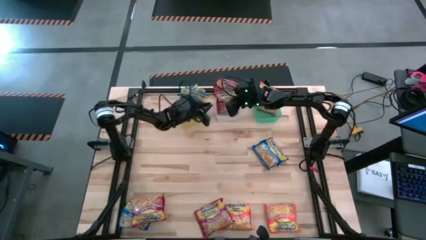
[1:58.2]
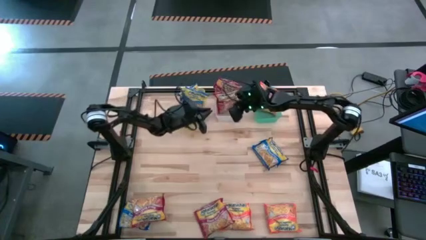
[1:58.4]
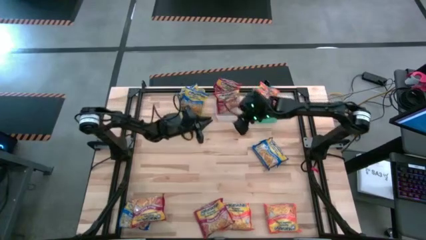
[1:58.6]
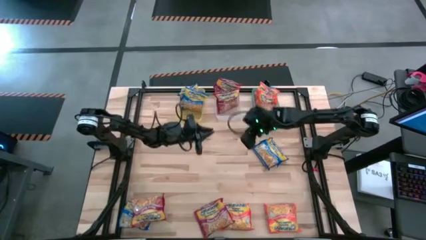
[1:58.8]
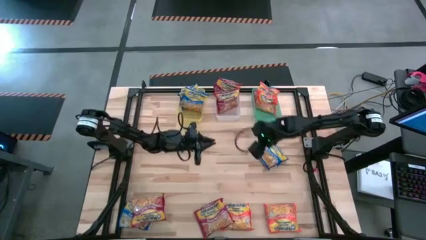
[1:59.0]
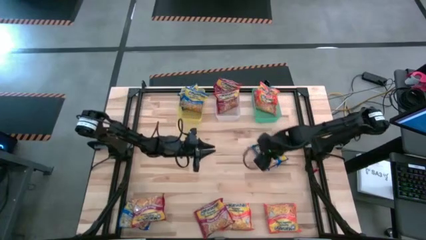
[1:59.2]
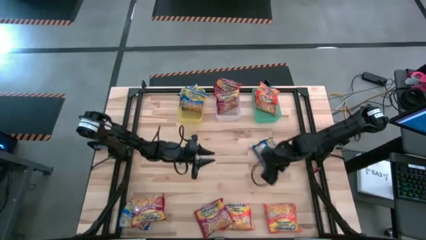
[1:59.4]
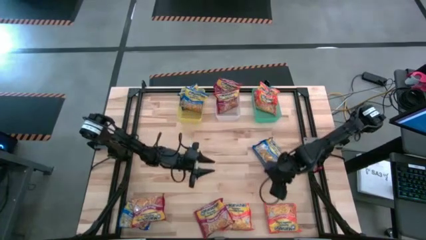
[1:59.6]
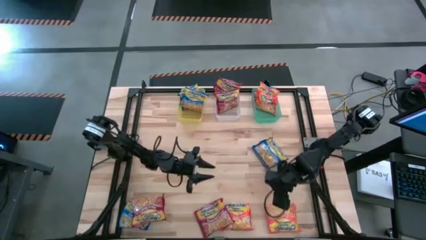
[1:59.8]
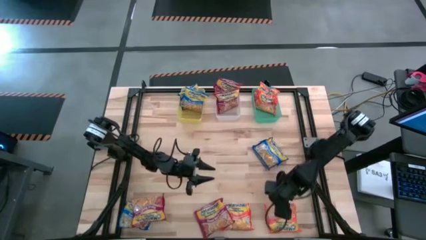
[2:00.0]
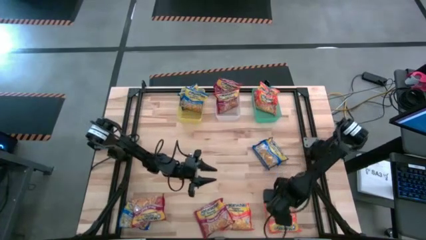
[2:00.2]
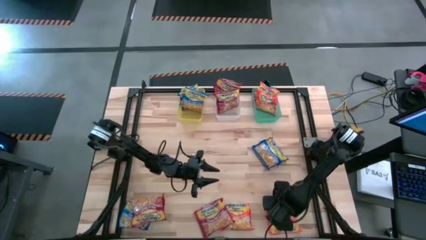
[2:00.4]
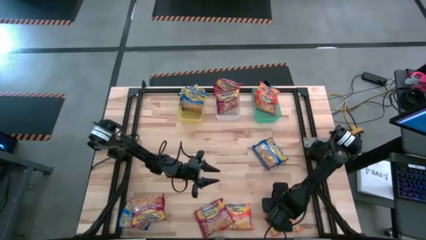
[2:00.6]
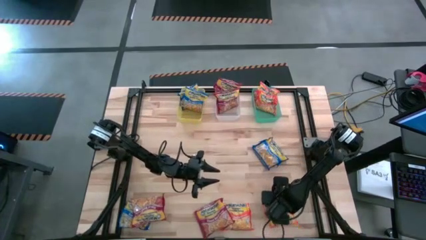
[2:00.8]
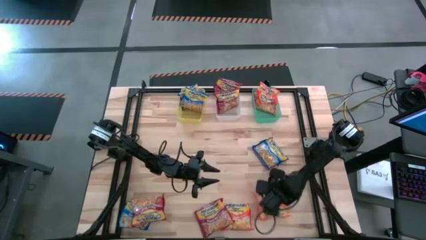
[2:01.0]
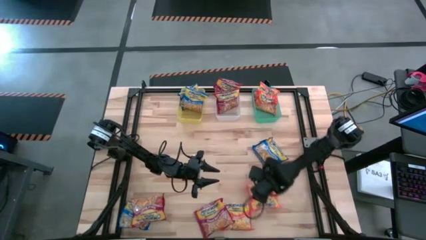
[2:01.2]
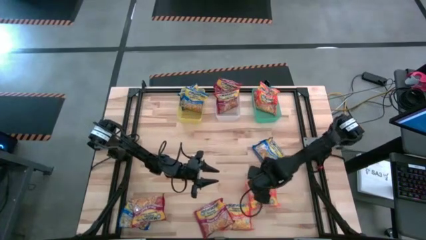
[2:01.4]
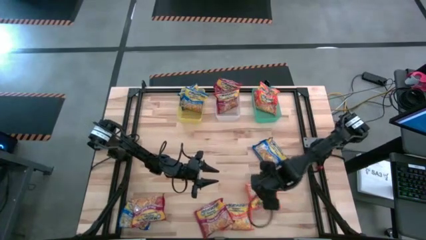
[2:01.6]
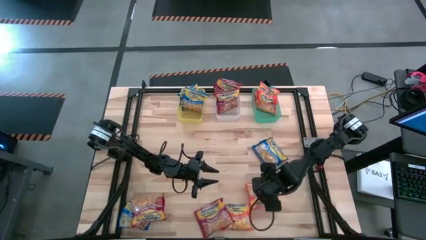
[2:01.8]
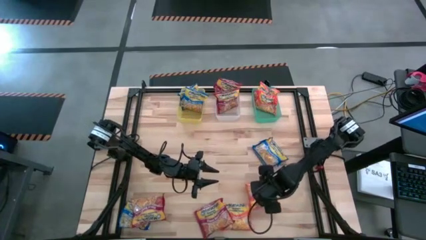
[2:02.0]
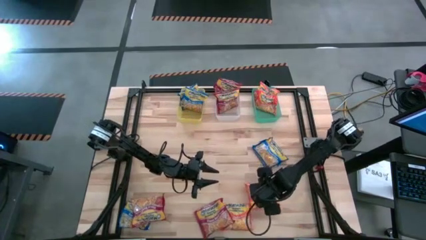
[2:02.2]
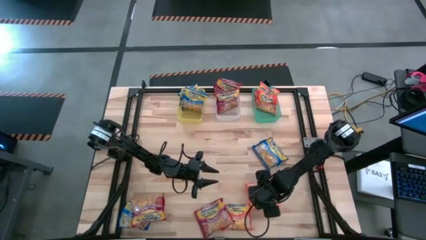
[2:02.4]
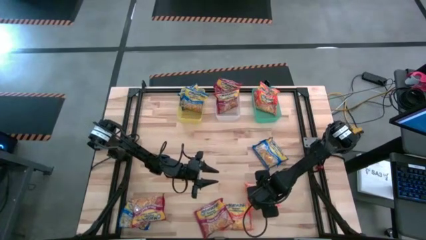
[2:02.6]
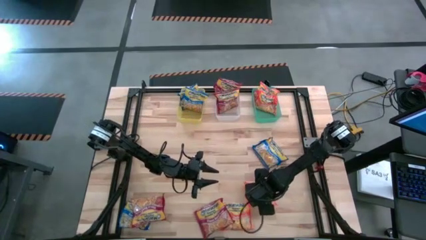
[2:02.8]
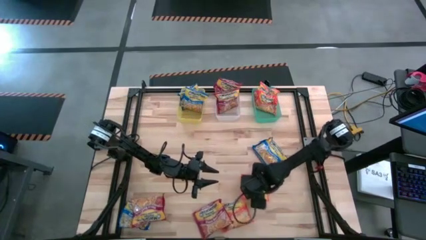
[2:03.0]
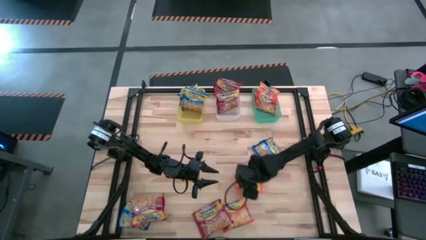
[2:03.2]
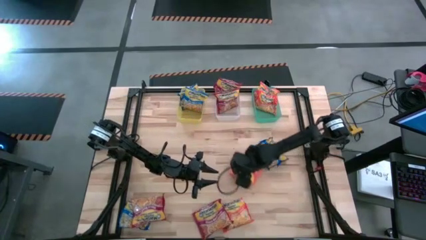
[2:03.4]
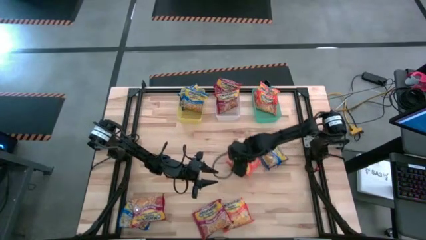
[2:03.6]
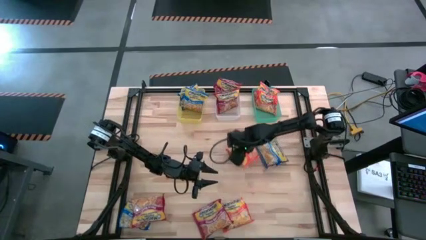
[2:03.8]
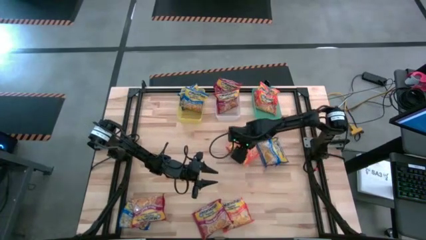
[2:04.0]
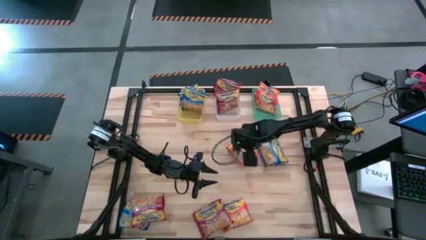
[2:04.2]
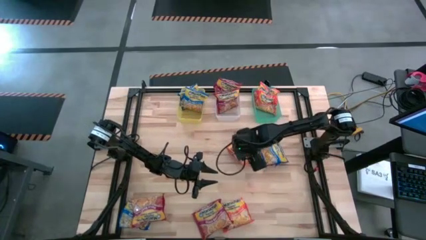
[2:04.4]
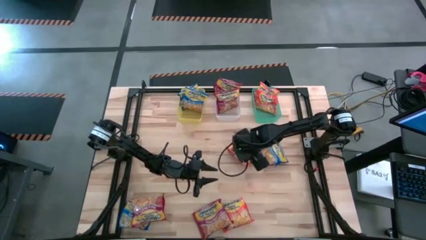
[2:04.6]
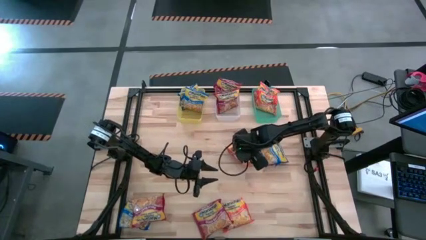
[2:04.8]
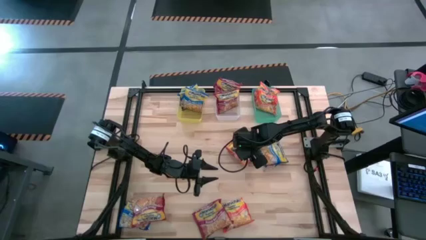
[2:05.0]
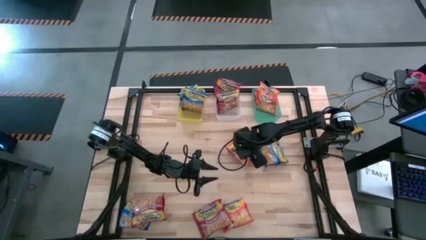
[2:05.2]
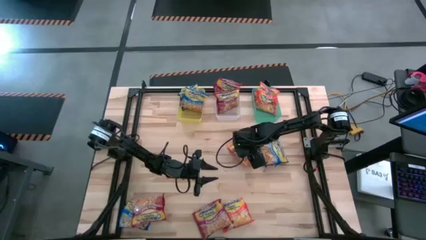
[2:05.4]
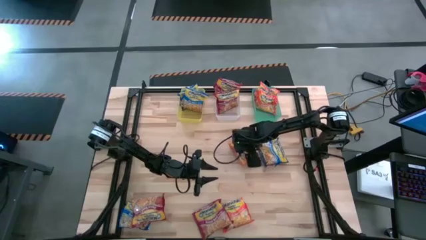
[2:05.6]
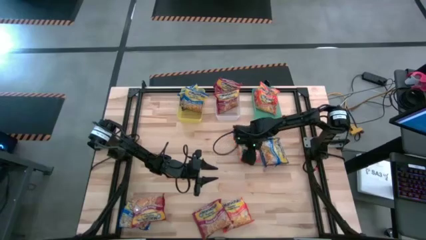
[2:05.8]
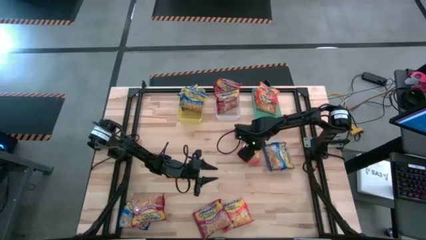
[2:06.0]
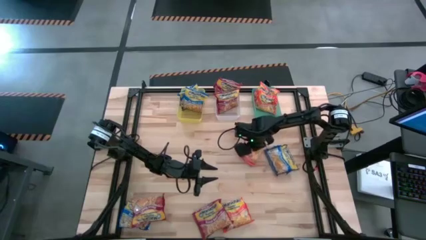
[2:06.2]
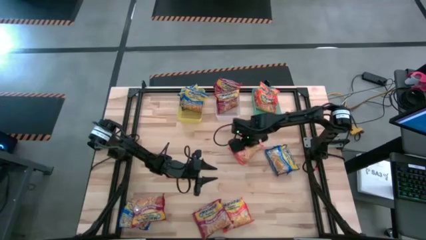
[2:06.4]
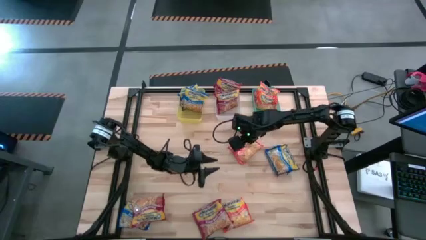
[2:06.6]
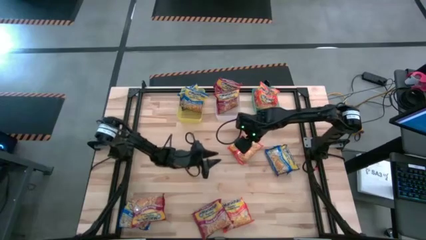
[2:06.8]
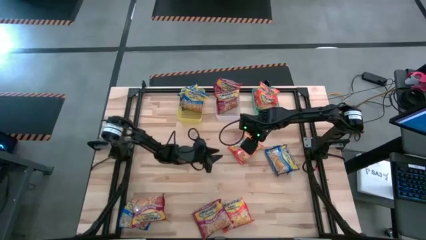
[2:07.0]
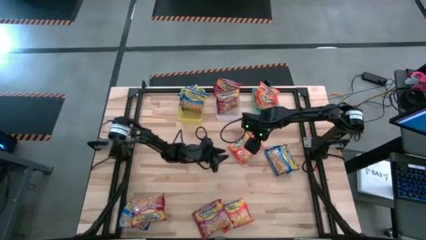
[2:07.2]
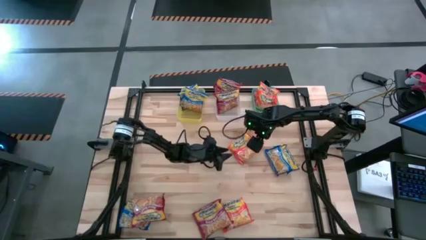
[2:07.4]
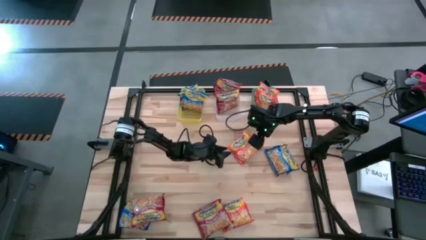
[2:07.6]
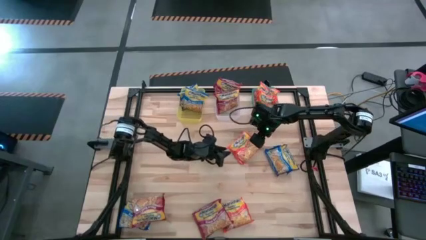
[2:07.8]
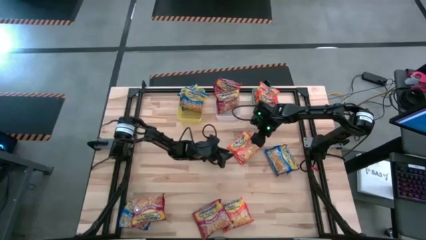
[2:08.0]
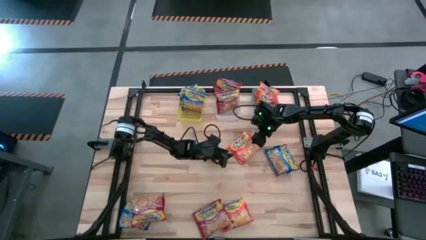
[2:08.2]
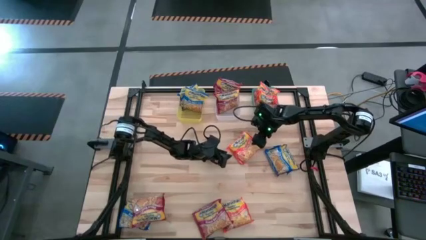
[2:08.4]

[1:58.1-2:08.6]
Task: Sort Maruchan noodles
Put the right orange noodle pack into the green bin

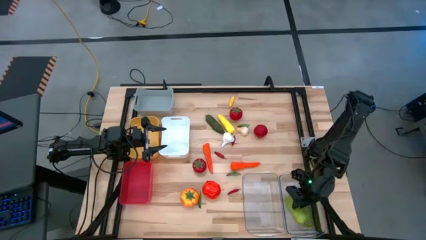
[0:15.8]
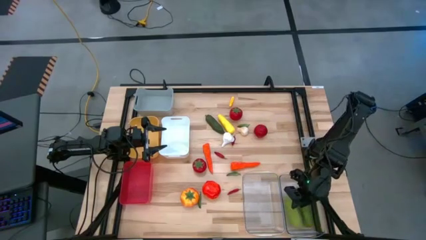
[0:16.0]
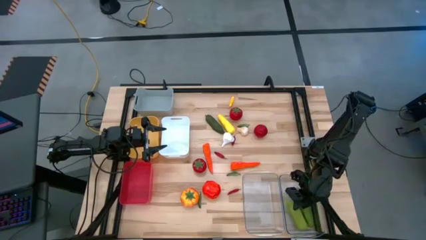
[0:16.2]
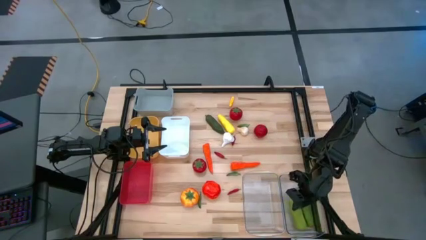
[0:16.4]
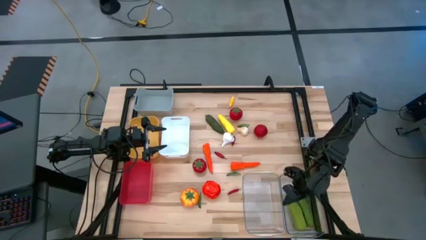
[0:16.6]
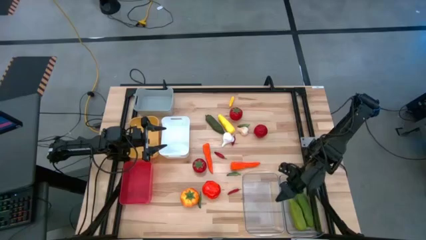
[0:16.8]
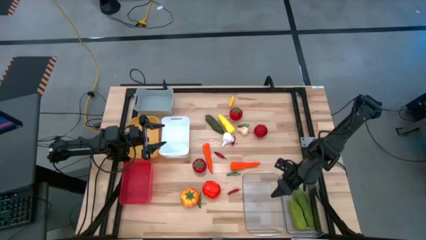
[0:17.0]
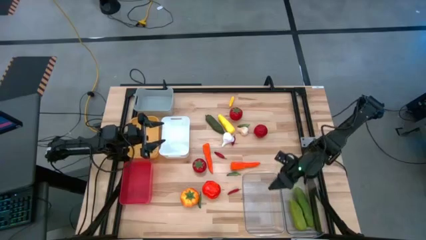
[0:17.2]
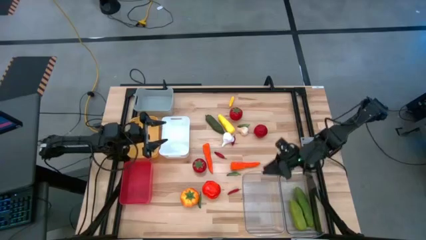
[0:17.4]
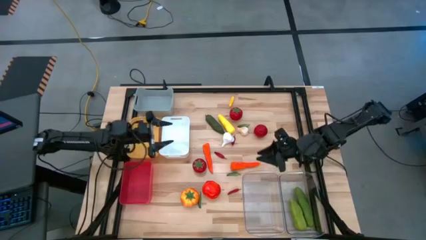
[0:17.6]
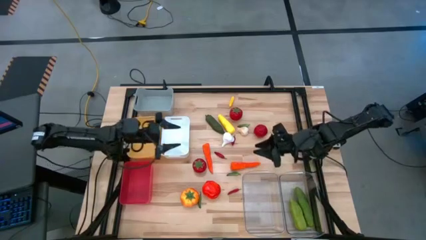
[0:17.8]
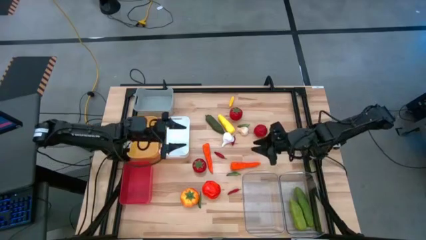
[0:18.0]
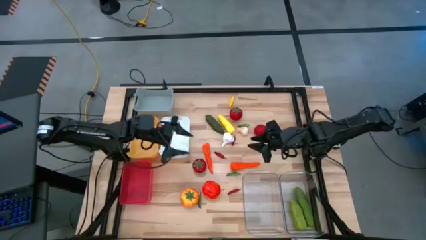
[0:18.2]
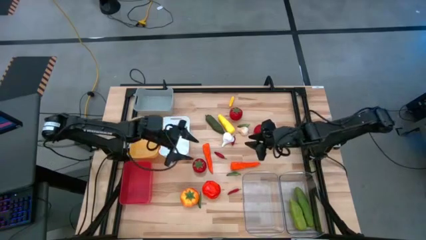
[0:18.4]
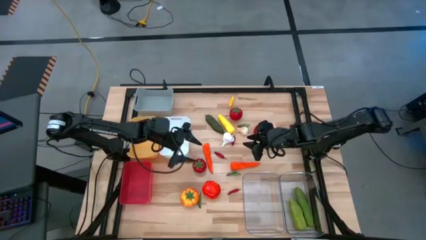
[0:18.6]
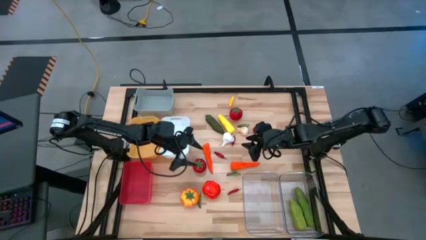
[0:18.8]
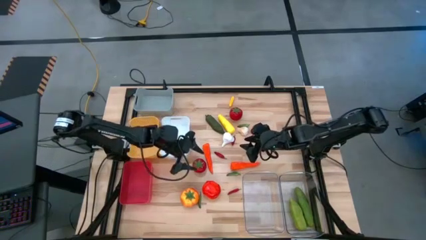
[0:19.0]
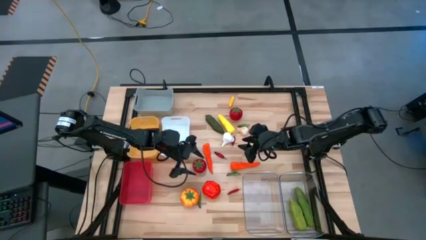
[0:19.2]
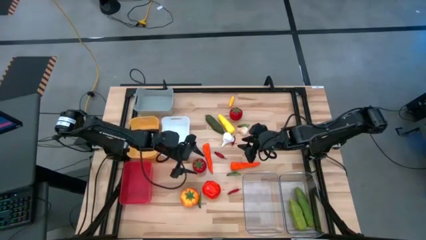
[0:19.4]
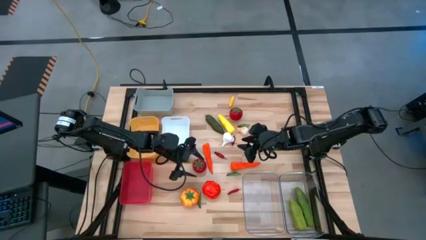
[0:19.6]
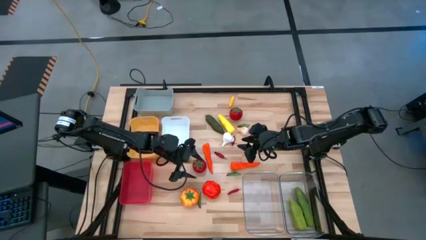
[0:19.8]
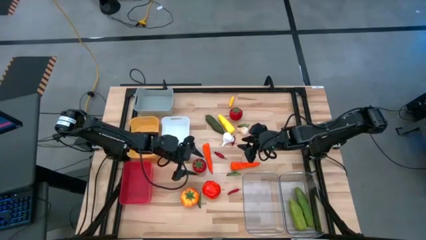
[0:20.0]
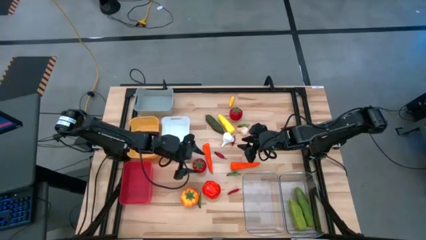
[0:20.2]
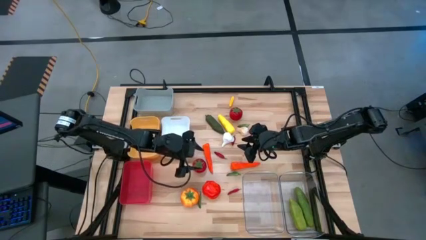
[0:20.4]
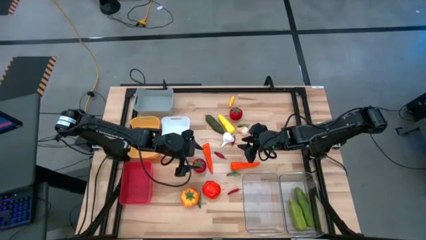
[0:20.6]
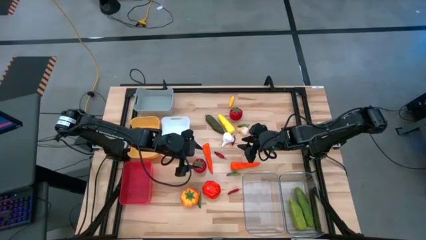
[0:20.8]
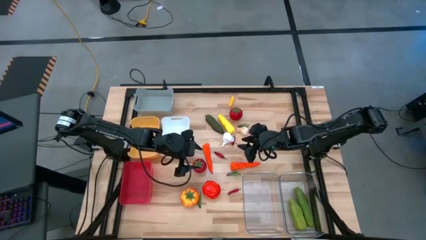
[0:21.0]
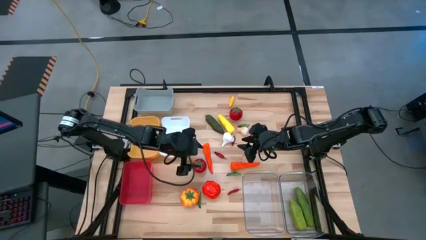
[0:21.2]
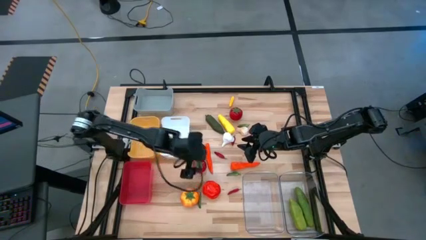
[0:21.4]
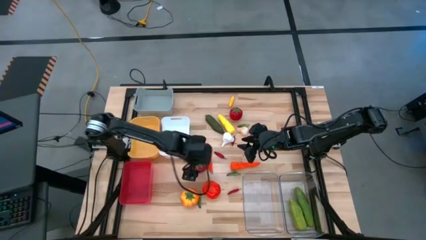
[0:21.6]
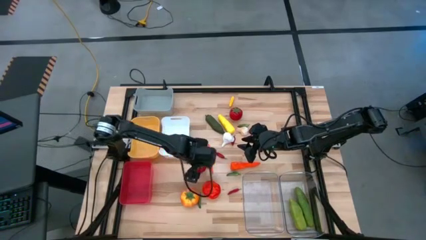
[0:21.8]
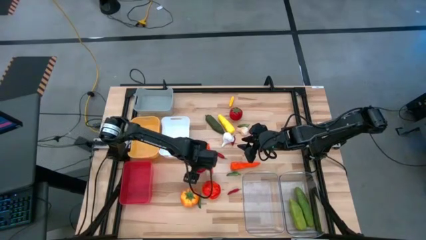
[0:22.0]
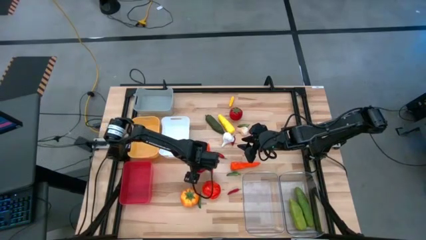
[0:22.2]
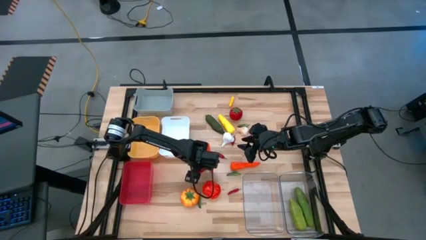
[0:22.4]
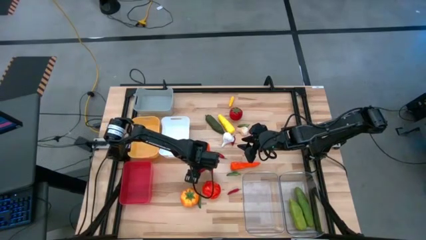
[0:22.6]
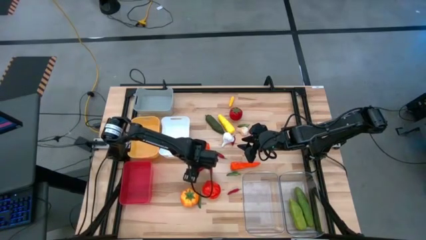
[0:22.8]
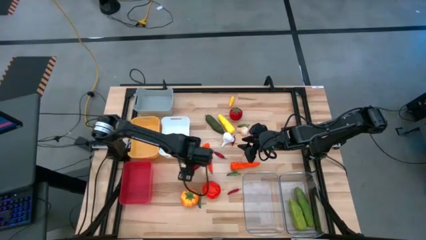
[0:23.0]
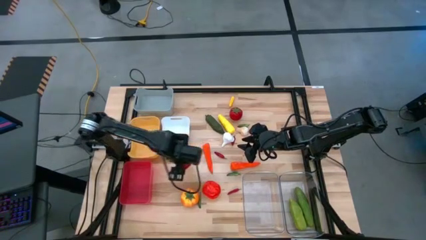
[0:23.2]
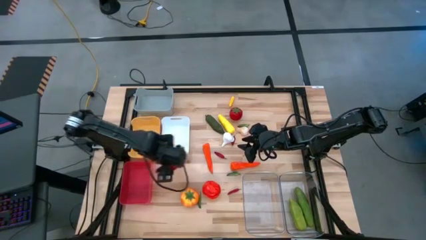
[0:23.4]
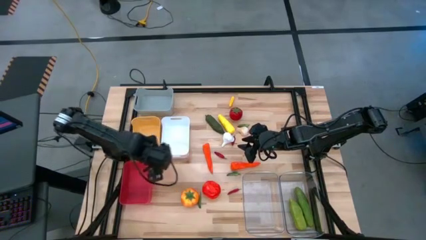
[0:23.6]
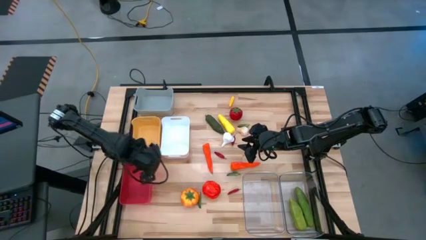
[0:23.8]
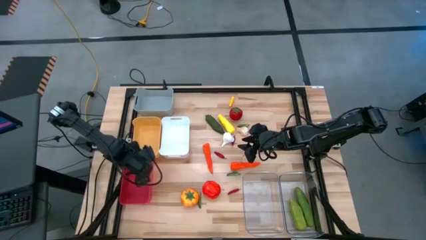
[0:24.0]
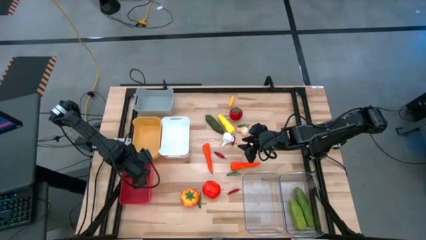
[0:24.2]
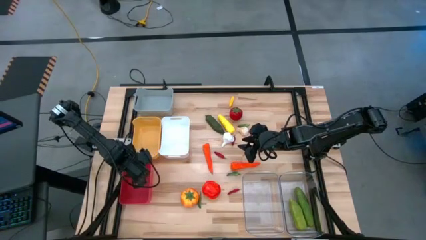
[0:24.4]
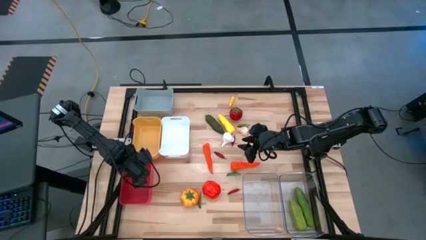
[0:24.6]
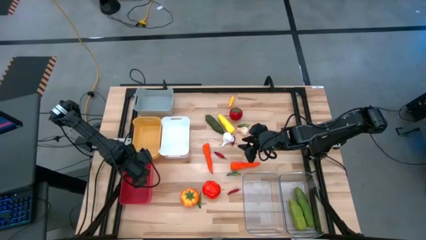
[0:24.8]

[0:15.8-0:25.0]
Task: Sort produce into baskets
Put the bottom red tomato into the red bin
